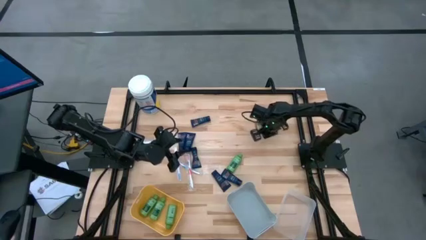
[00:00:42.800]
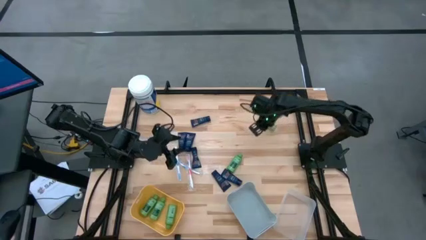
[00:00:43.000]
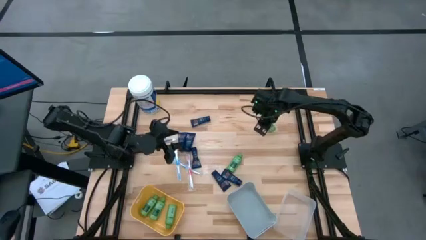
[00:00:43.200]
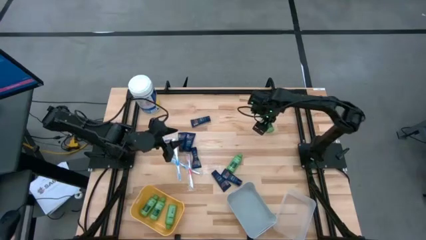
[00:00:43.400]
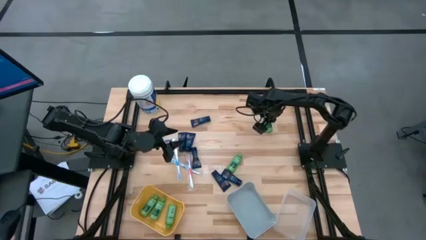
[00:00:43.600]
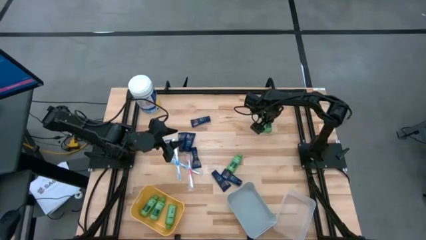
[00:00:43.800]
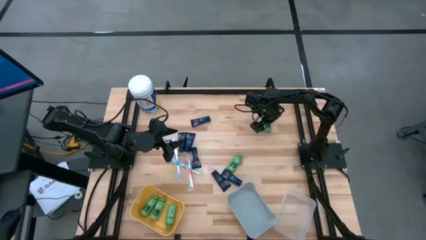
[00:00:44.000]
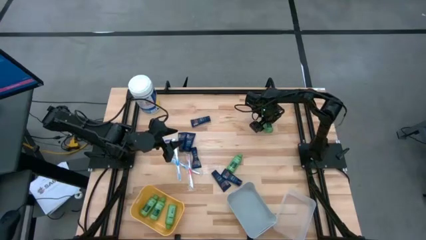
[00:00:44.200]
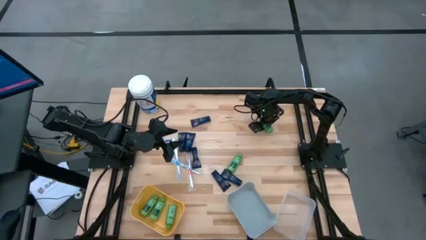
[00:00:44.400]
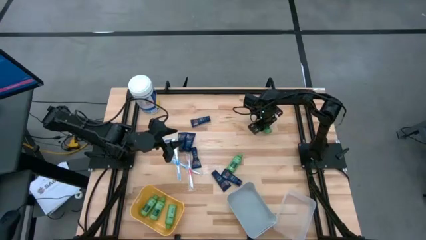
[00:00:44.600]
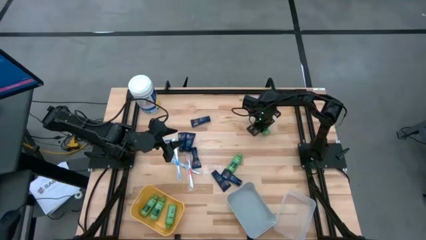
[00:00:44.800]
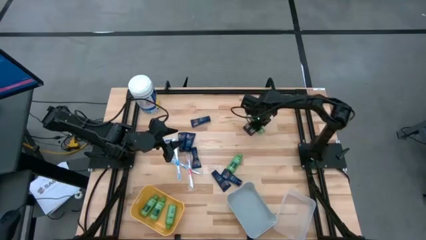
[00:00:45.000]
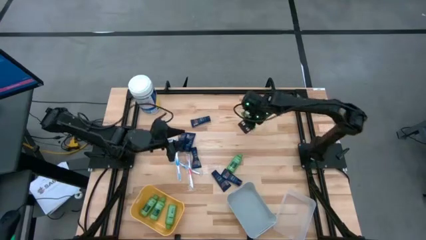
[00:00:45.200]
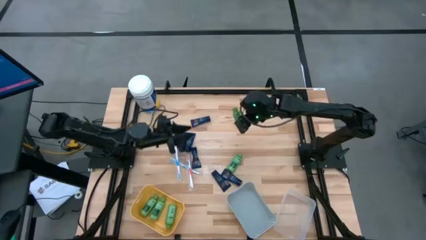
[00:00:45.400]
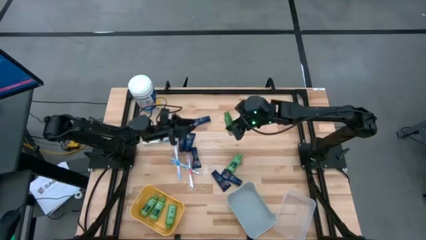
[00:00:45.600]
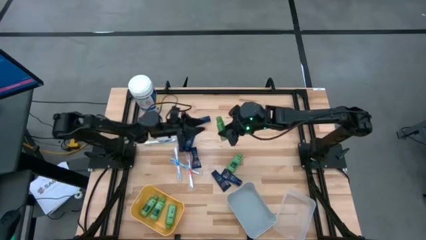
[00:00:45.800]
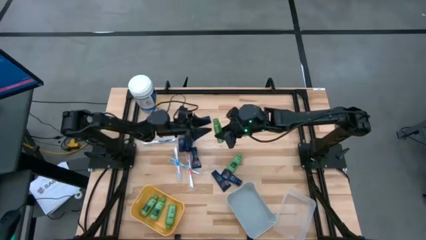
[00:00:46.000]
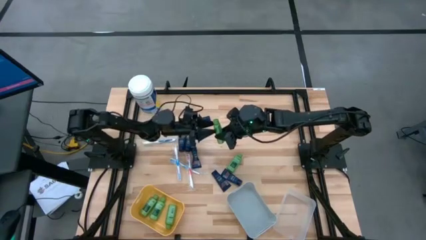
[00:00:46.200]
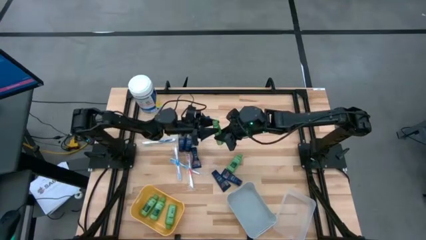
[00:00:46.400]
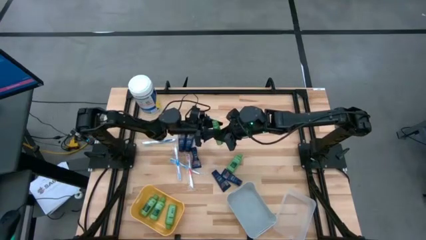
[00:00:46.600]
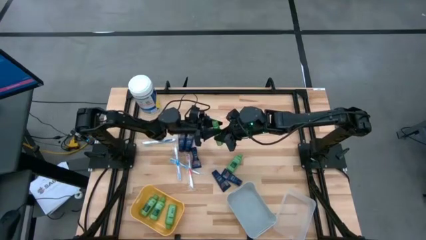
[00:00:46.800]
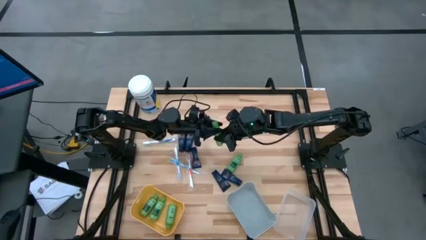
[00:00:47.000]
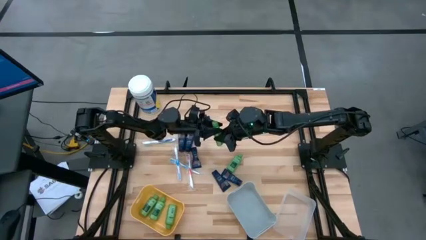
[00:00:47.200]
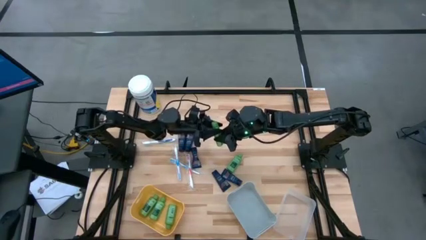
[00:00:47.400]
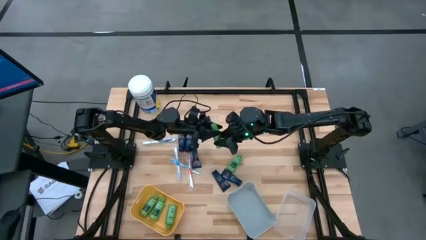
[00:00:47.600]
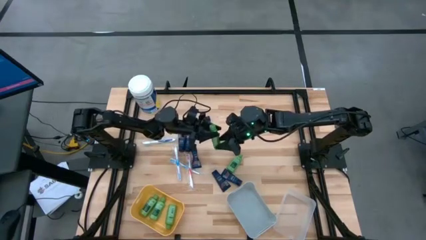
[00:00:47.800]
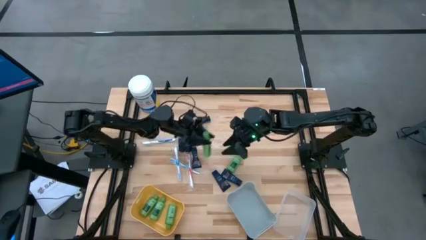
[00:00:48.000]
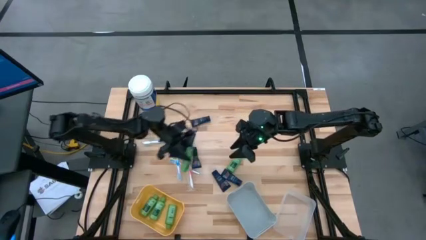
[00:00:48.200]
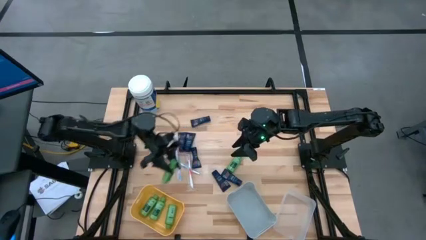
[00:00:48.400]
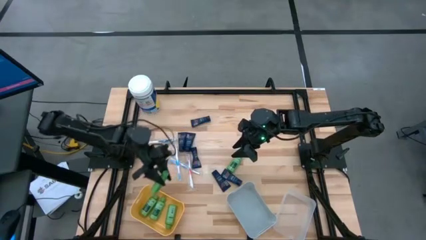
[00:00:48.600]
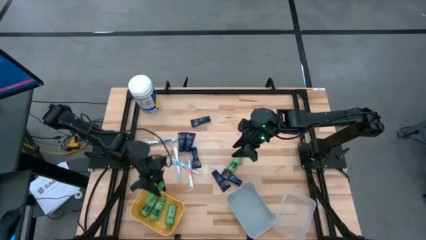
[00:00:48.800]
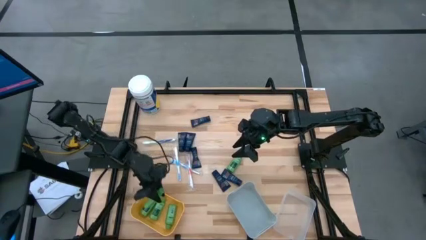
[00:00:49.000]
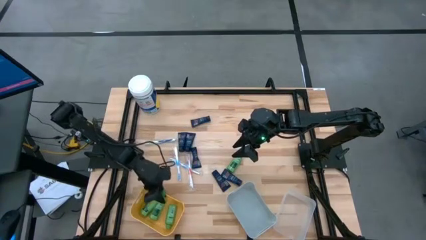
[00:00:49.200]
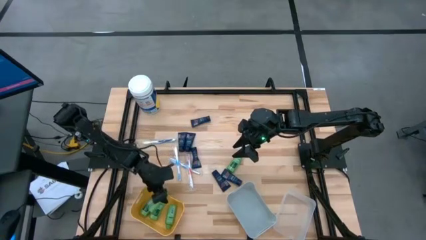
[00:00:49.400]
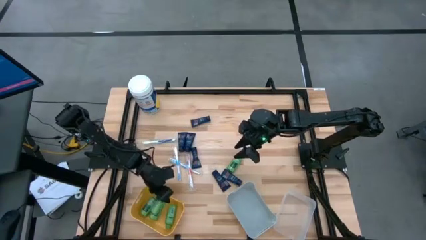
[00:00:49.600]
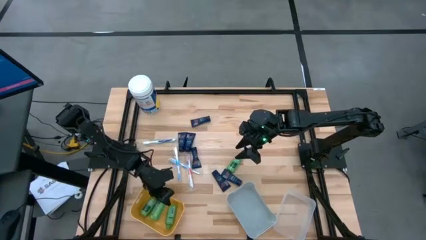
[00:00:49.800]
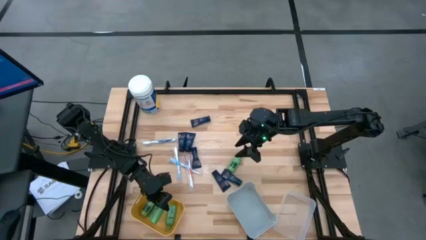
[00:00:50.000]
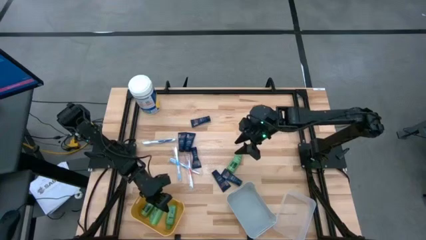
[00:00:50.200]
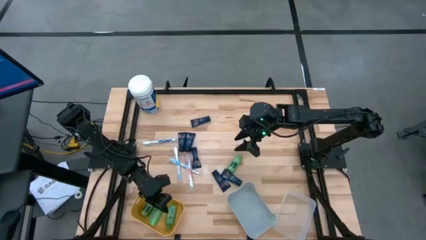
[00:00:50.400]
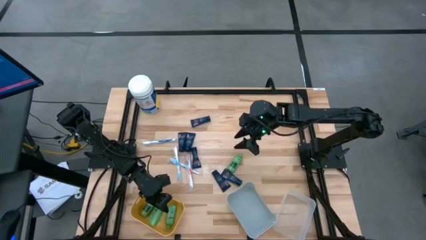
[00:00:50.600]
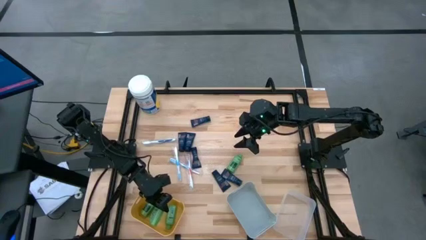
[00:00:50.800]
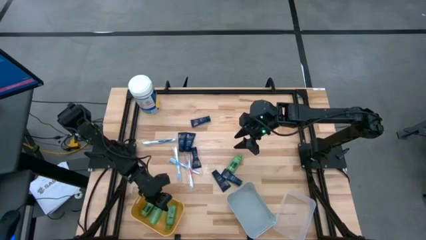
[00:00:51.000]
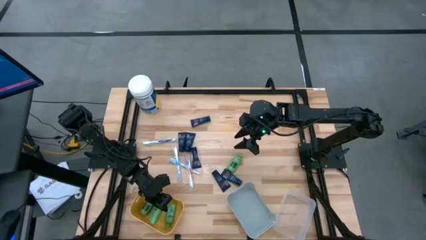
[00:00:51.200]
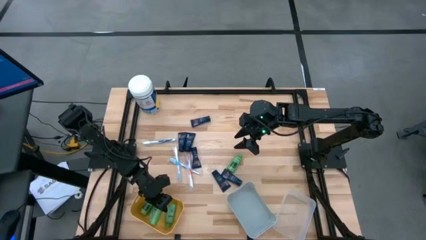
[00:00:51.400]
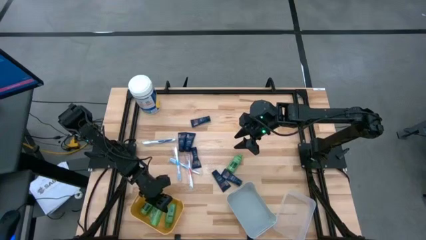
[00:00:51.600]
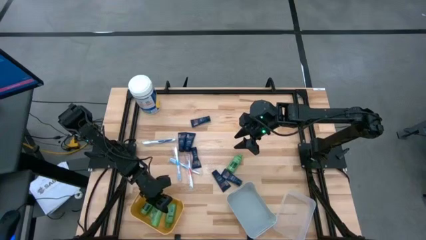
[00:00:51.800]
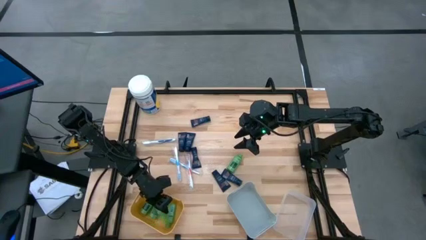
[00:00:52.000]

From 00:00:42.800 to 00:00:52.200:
Task: Pick & Place Travel size toiletries
Put the green shampoo into the yellow bin

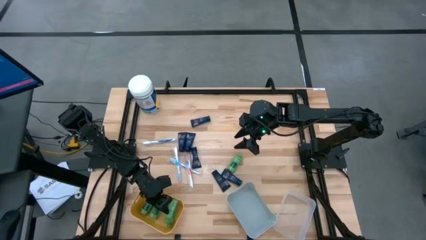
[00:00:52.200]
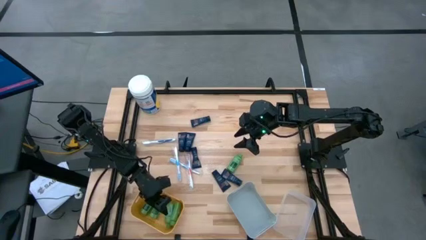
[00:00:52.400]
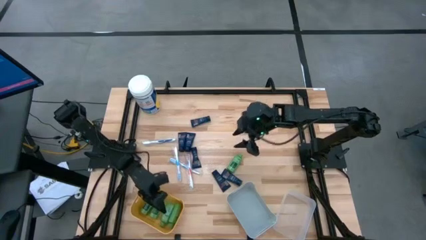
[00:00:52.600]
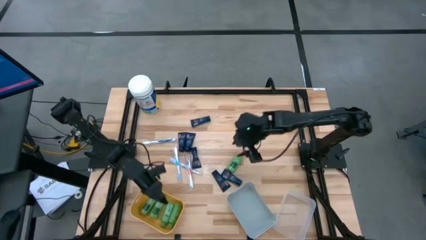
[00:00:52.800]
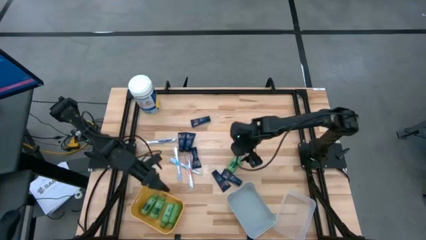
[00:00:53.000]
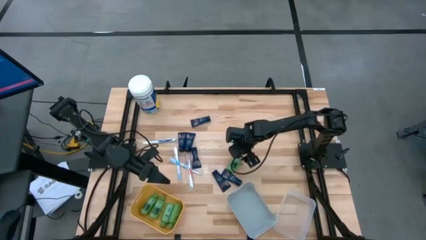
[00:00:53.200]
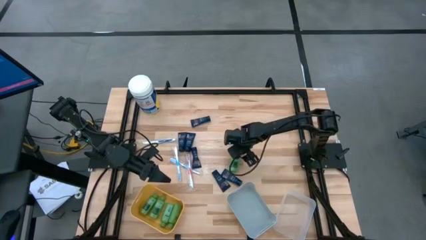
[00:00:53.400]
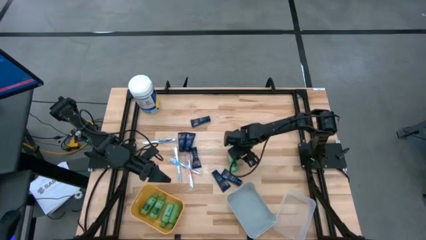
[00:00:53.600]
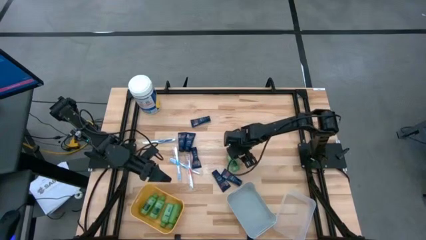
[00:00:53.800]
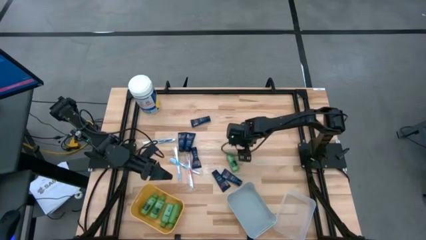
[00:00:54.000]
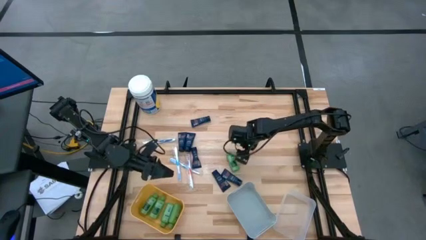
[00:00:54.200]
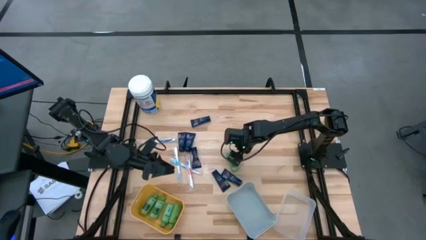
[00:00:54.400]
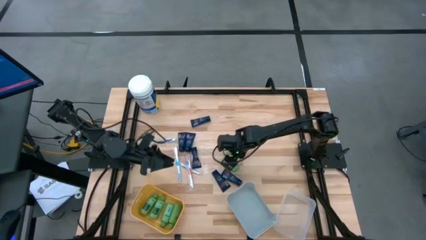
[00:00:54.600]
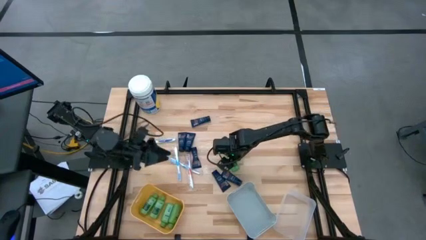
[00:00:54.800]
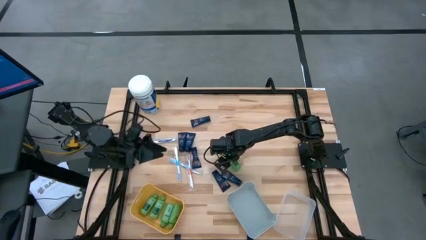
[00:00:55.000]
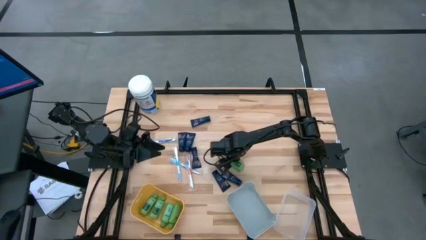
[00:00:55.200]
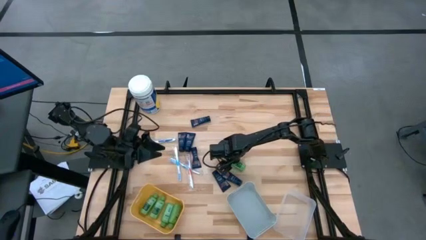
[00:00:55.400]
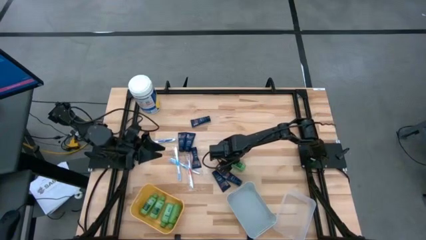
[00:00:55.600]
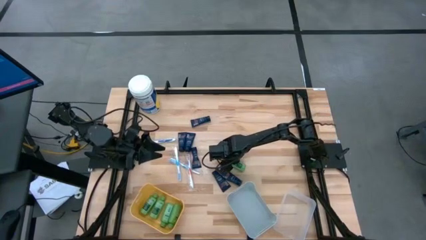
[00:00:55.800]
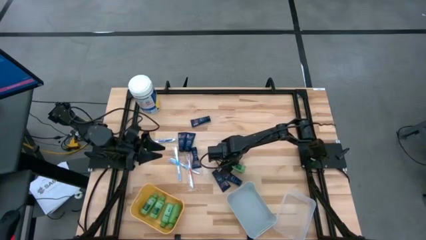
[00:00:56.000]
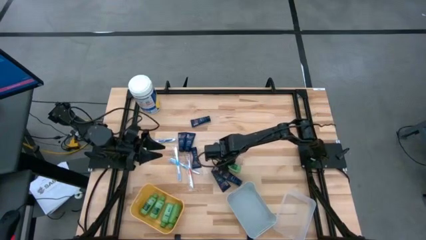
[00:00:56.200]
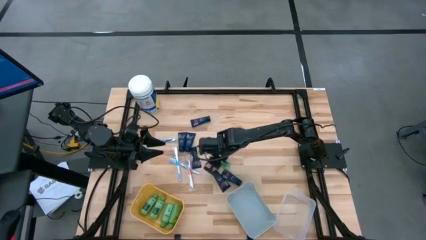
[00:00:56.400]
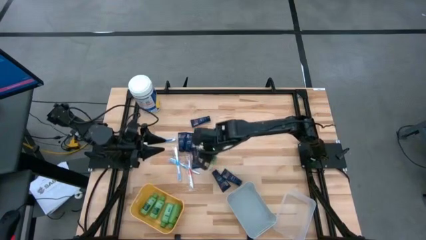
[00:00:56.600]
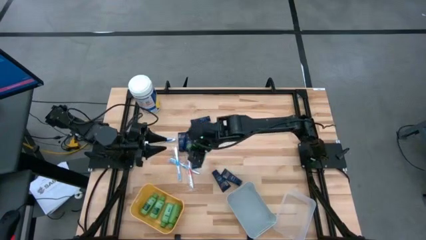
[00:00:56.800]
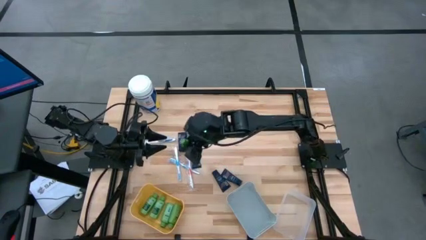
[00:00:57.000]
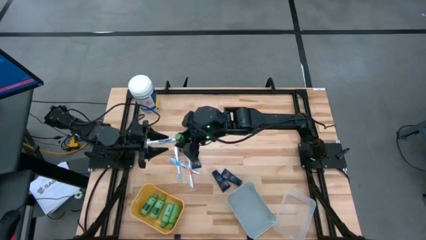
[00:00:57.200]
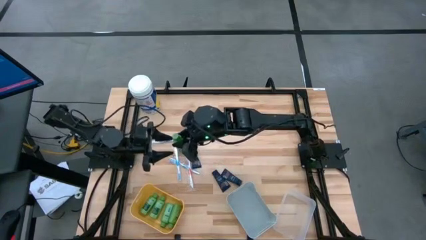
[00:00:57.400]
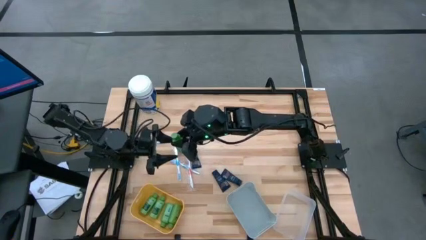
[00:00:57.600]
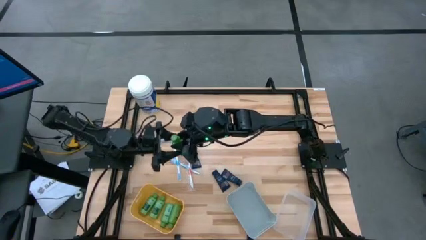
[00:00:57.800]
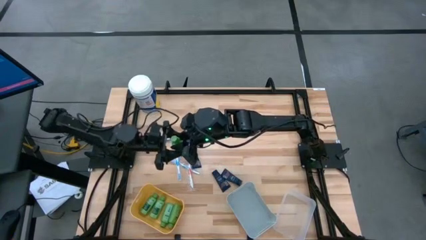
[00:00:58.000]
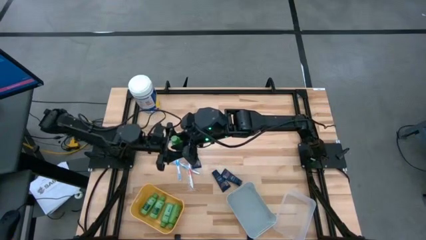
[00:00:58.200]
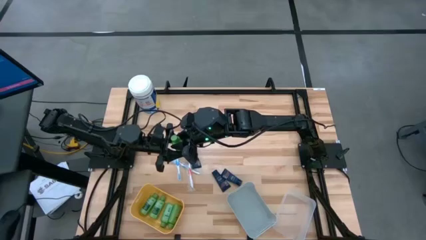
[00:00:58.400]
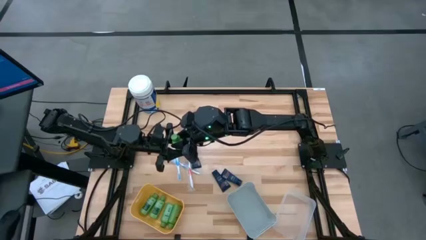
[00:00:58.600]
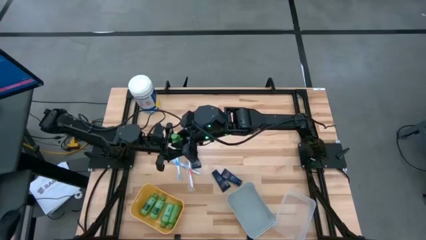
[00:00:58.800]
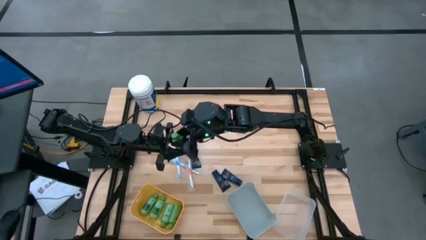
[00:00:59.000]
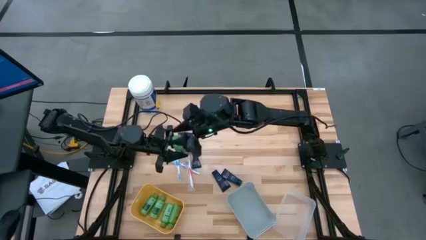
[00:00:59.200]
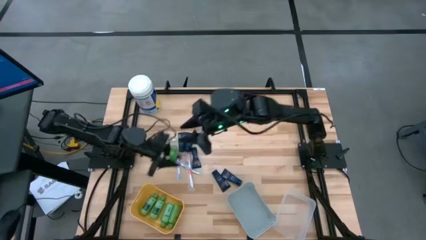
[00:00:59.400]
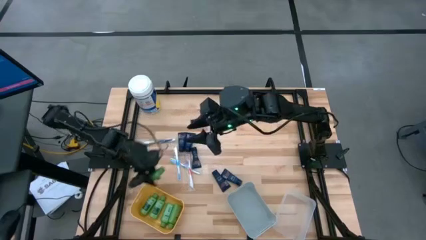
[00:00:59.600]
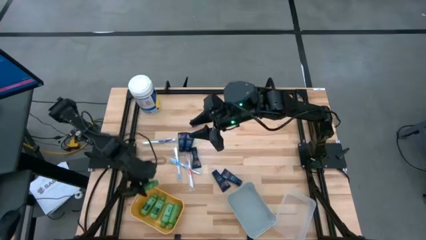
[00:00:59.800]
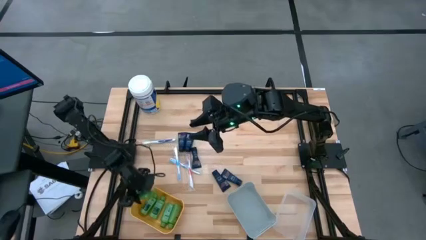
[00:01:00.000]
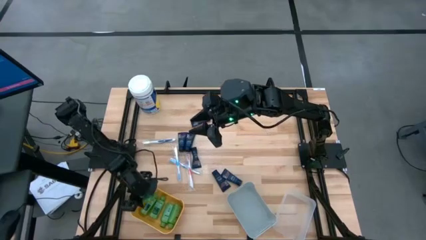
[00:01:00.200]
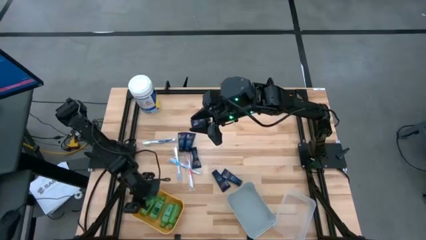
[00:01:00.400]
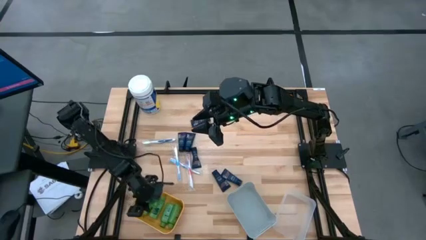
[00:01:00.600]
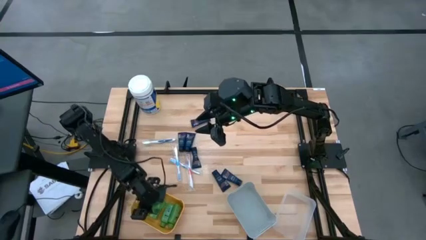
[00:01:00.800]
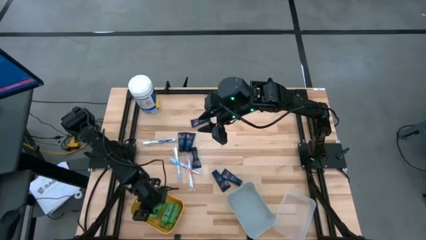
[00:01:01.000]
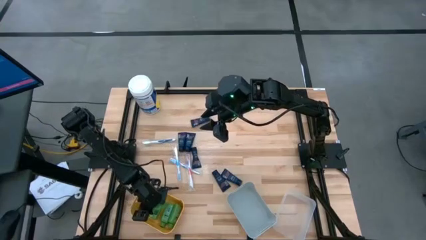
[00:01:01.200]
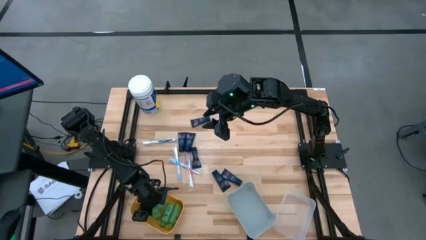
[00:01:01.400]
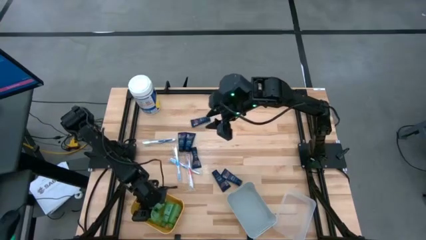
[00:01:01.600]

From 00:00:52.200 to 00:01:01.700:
Put the green shampoo into the yellow bin
